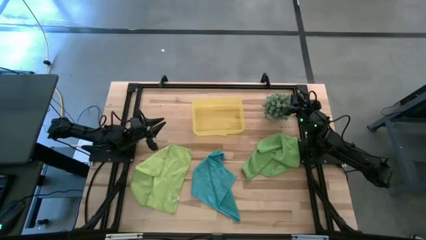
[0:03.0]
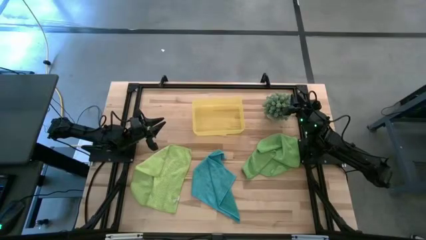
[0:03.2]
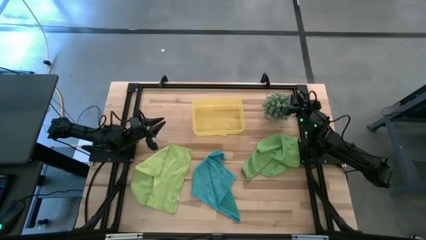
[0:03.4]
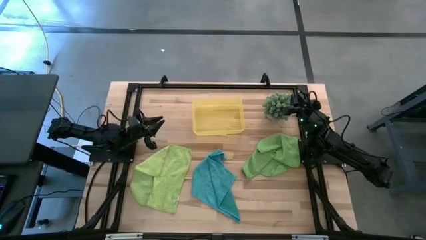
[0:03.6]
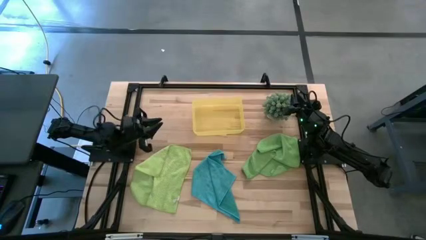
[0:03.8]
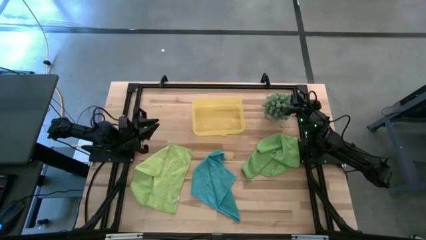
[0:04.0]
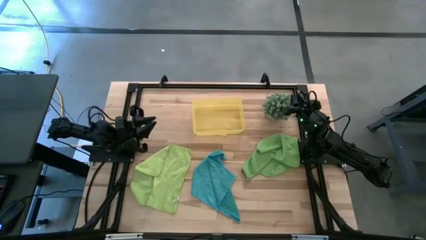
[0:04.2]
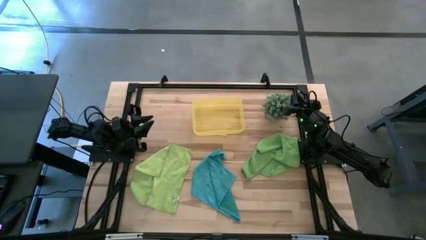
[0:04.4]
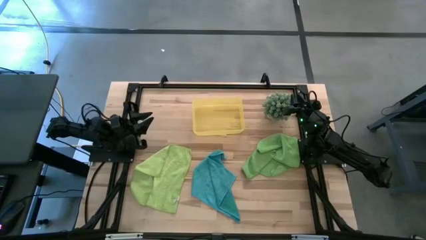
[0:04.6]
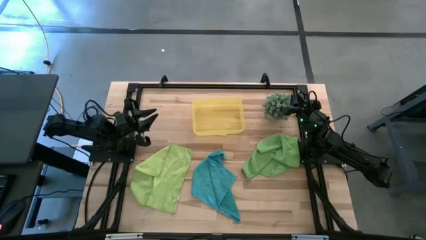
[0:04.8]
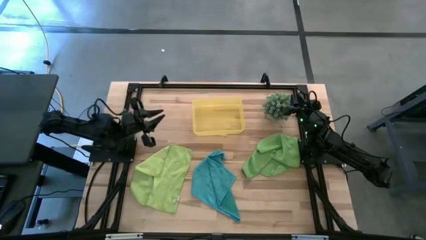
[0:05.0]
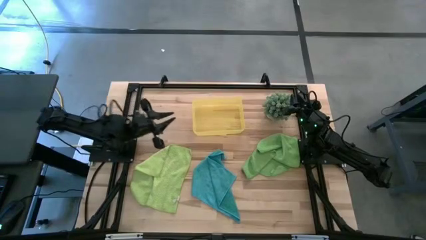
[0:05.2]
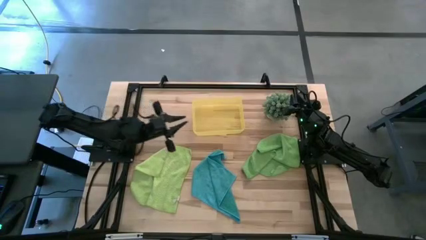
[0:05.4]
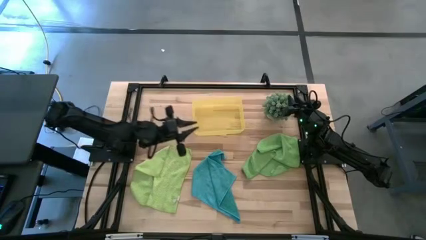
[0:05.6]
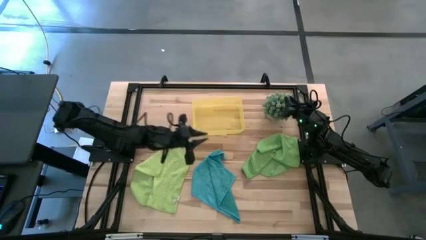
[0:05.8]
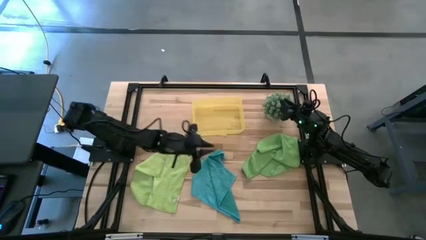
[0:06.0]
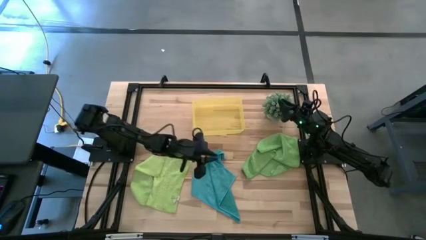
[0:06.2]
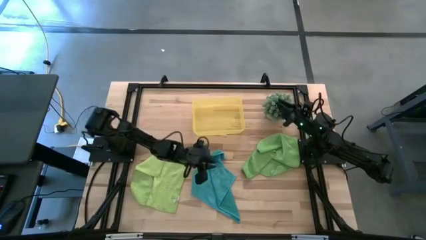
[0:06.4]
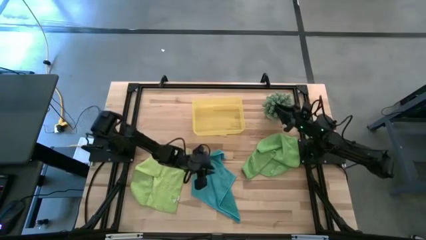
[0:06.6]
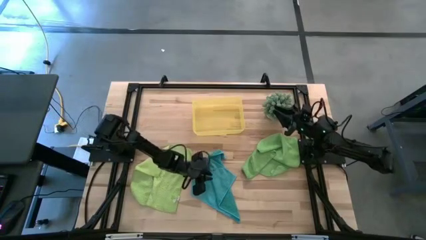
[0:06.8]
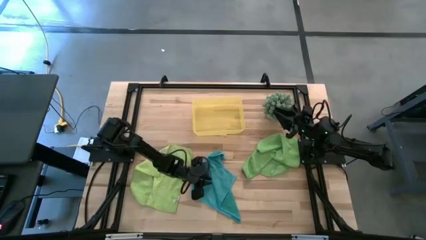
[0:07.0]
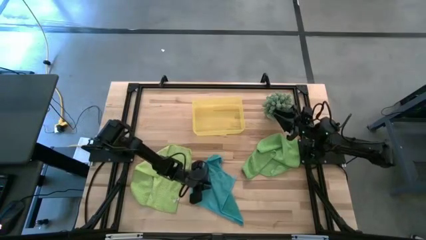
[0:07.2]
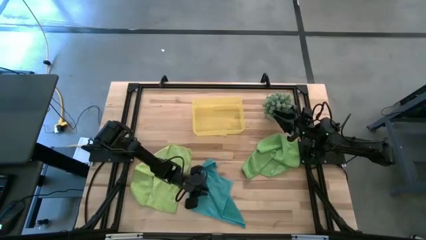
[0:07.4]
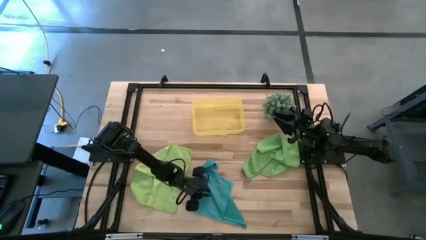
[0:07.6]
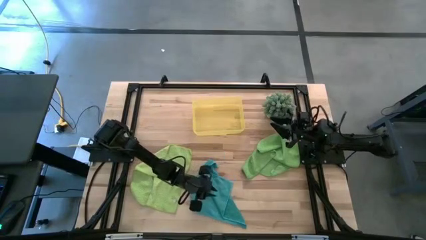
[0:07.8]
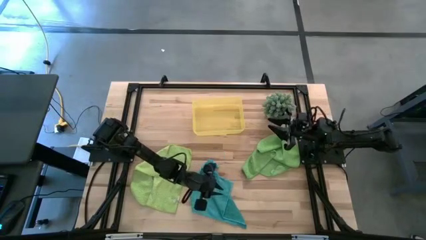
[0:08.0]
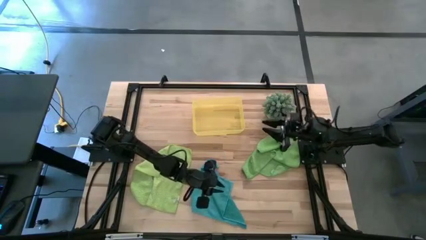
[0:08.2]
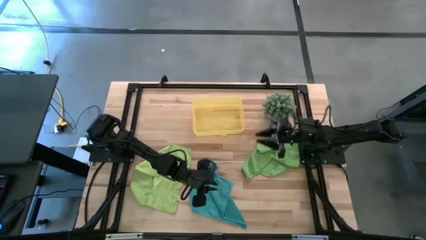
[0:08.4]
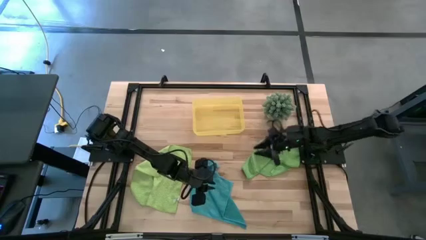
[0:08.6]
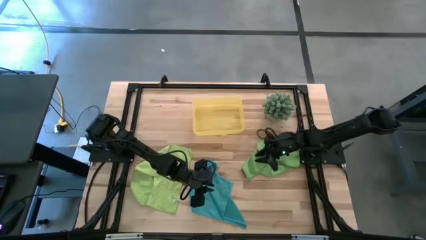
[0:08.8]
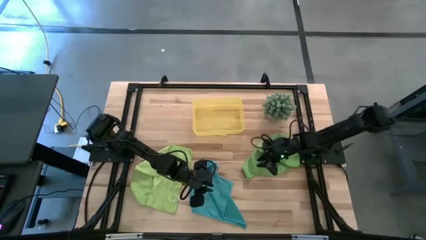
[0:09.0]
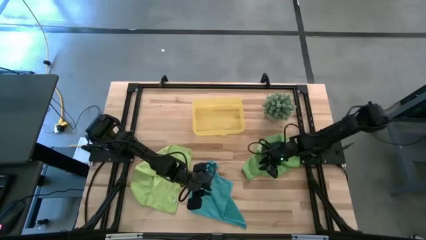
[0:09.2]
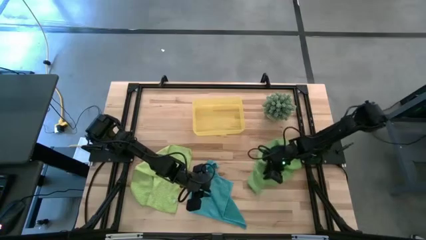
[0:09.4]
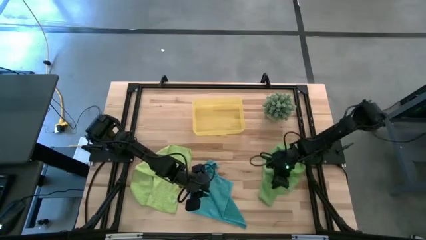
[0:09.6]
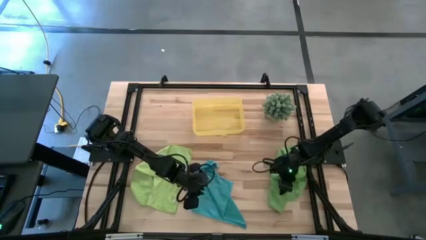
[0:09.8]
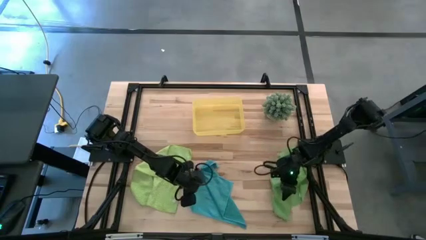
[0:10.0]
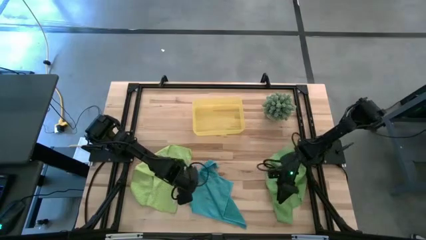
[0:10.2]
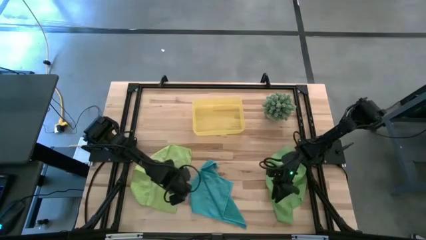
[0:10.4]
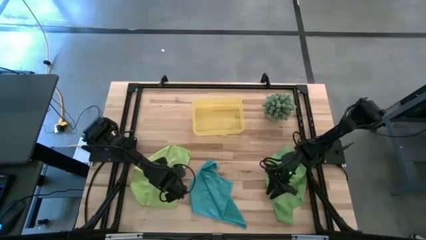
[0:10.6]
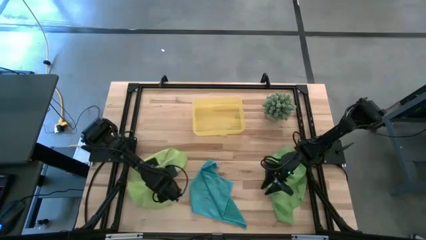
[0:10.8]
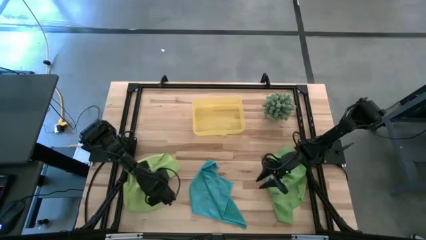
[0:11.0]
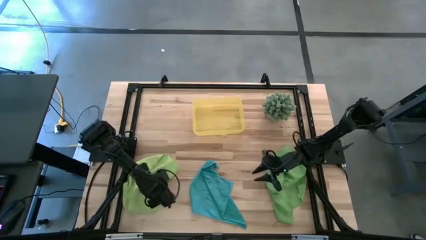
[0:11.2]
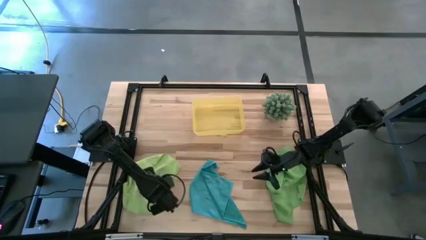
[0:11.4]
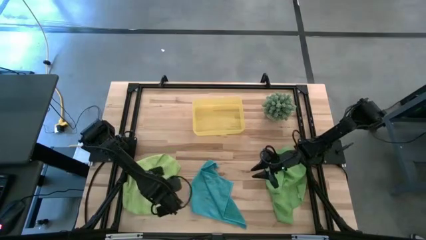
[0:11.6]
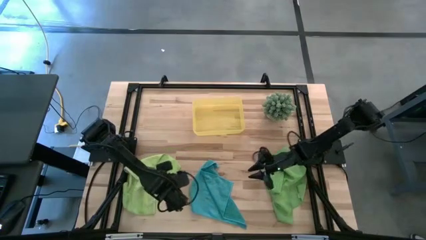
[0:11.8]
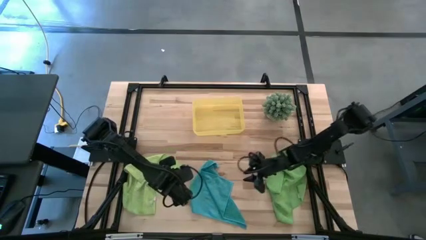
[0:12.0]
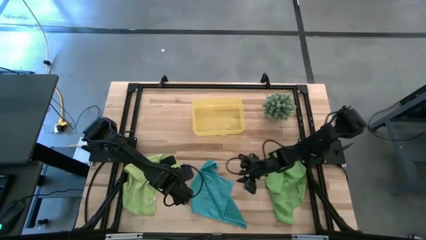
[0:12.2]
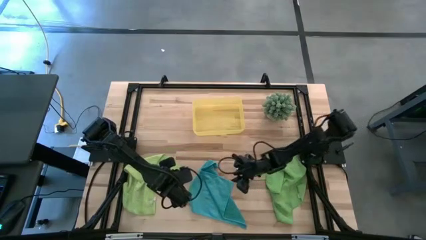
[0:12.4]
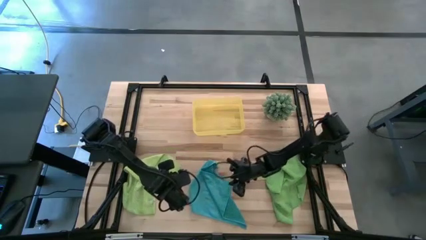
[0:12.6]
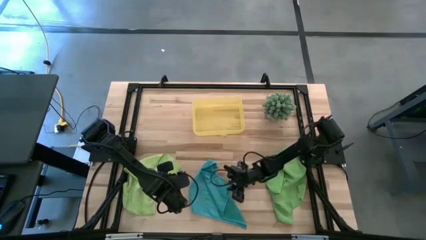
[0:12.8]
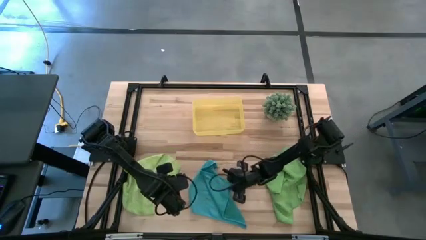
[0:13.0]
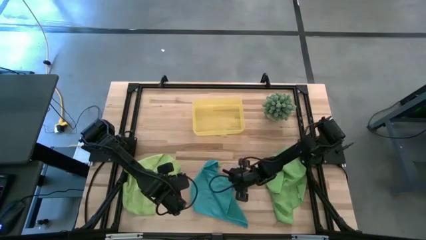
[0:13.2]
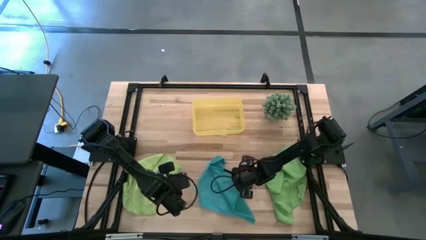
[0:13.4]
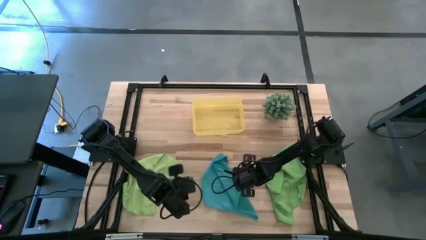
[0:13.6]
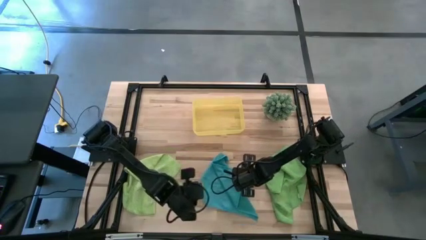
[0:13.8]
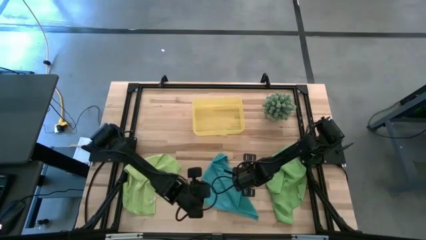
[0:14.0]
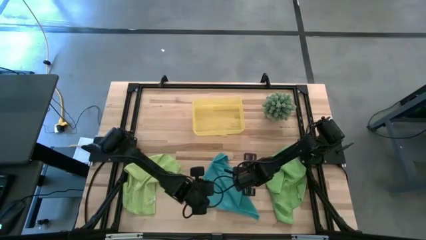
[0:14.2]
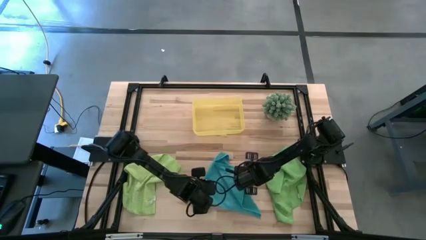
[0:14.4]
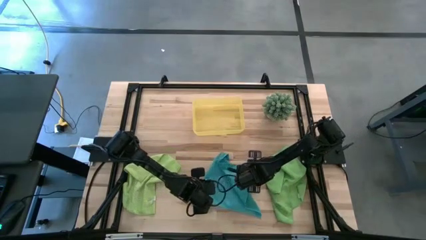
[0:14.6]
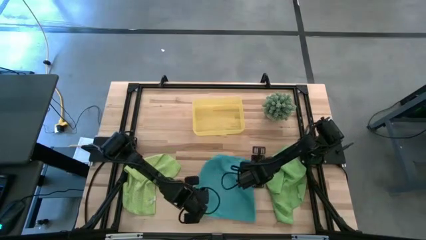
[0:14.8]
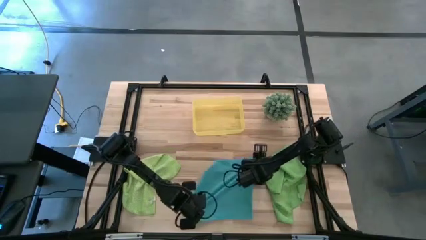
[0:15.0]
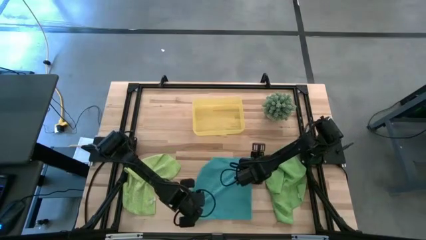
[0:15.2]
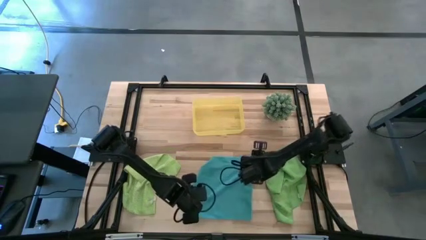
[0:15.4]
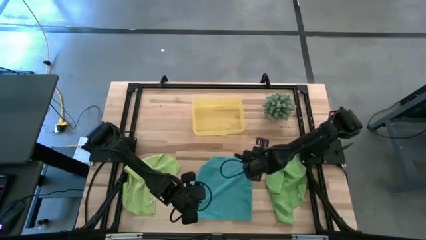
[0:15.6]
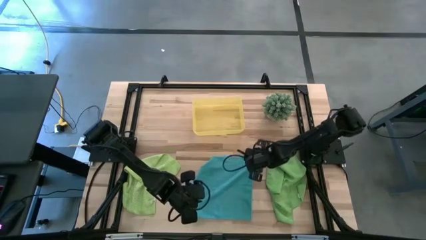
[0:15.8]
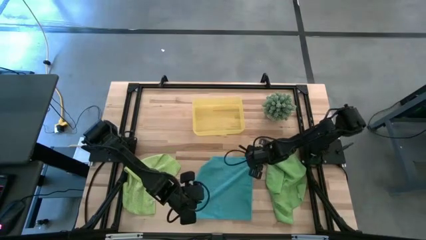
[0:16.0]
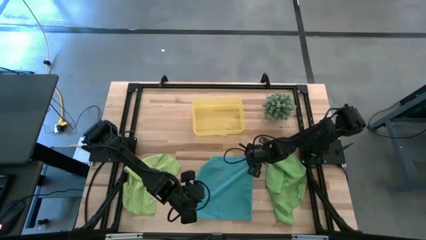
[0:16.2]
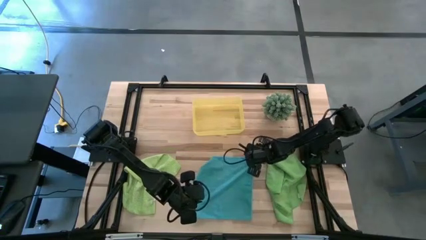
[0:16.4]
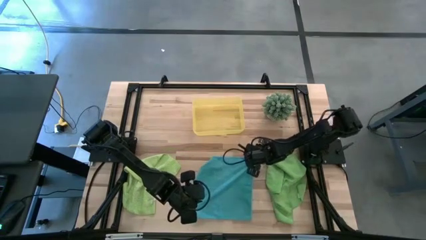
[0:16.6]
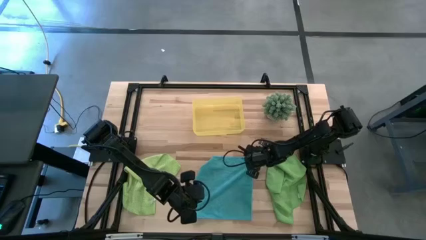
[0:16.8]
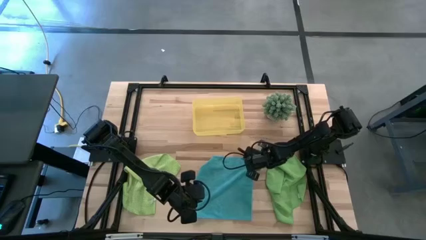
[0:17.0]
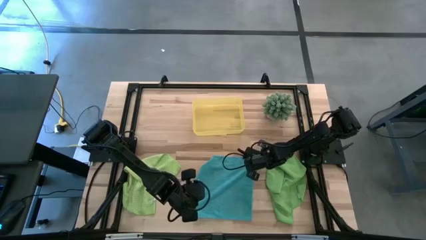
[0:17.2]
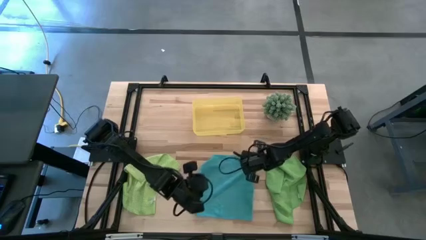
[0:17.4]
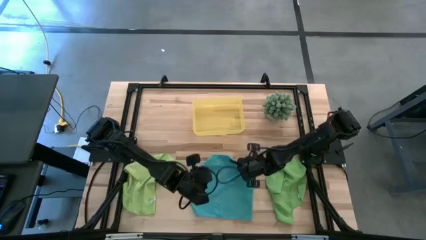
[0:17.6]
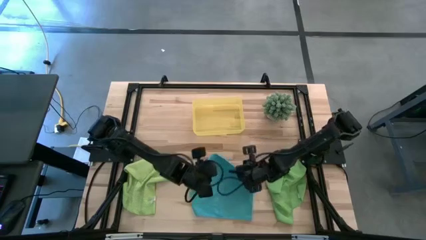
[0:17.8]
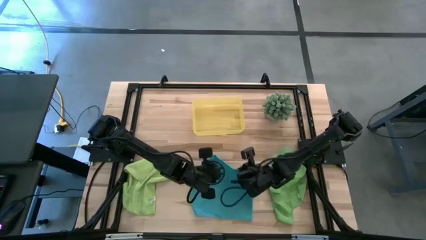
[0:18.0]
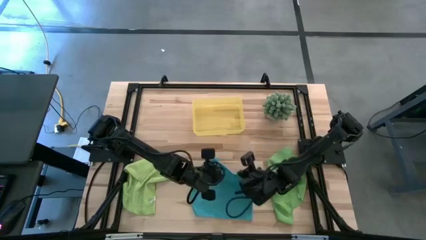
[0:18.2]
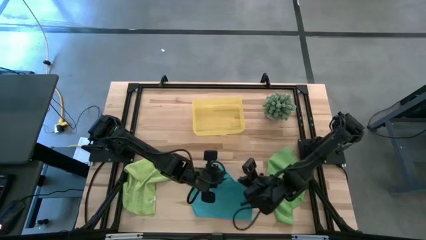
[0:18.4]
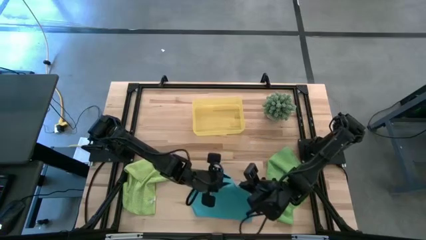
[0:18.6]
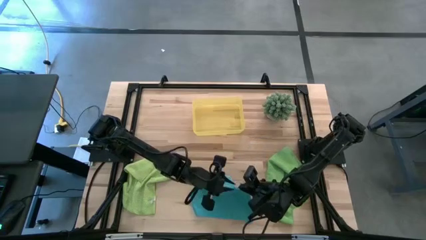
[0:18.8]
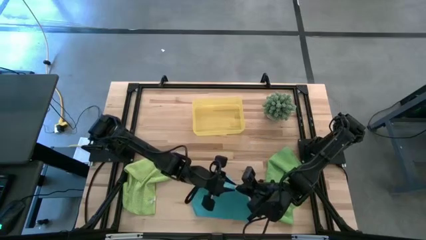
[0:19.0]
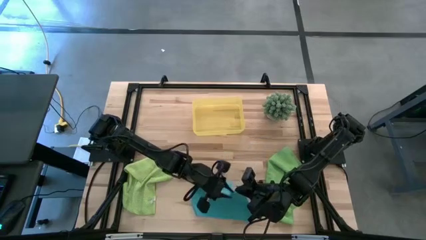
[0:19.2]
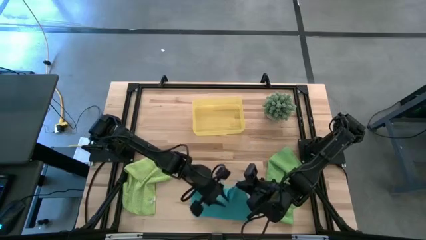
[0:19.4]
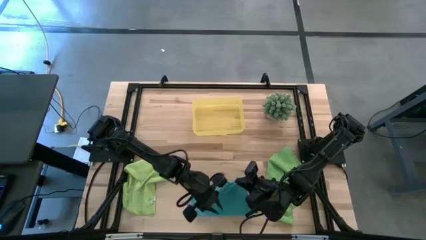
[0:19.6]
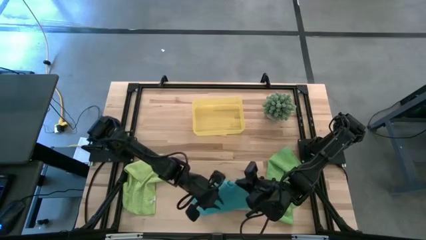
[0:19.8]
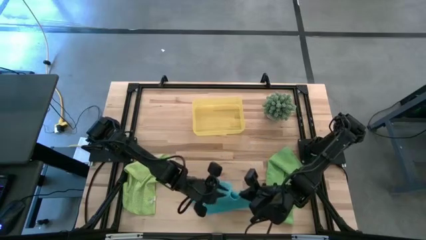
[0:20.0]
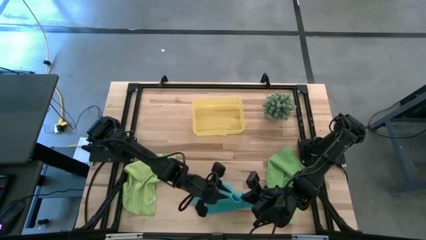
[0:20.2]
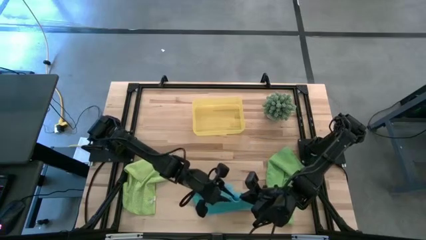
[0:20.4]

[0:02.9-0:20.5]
Task: Roll microfiber towels into tight, uniform cylinder then place into a basket
Fold the blue microfiber cloth
